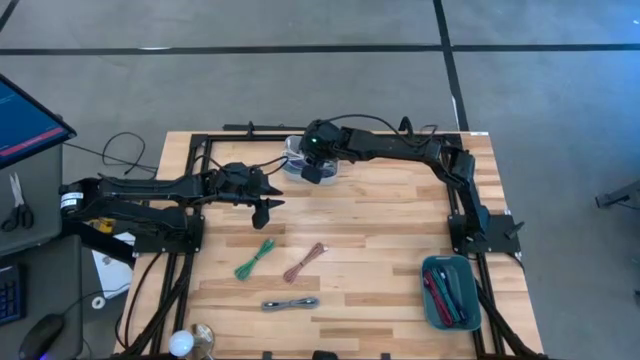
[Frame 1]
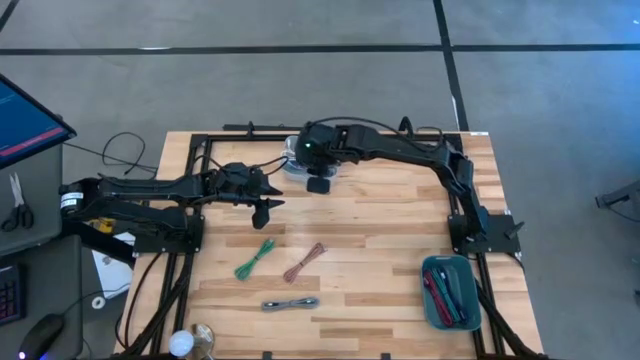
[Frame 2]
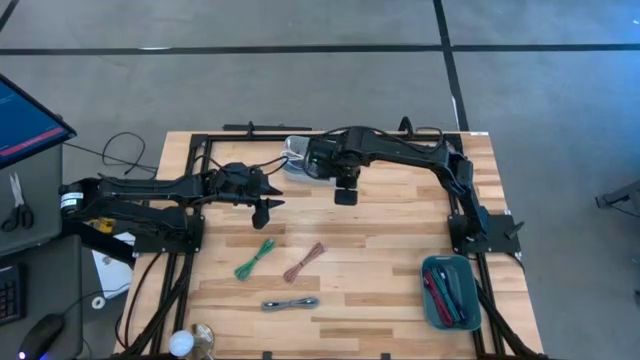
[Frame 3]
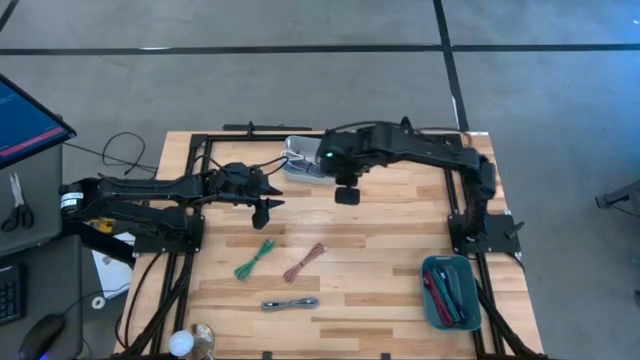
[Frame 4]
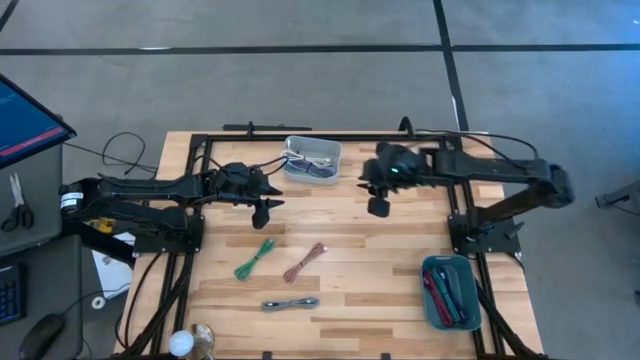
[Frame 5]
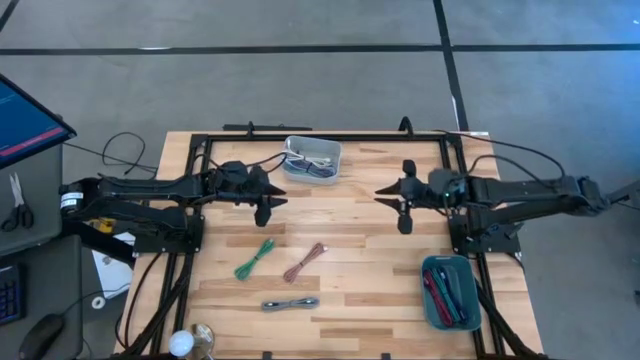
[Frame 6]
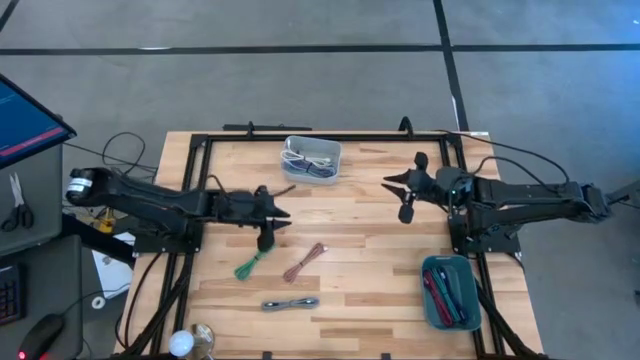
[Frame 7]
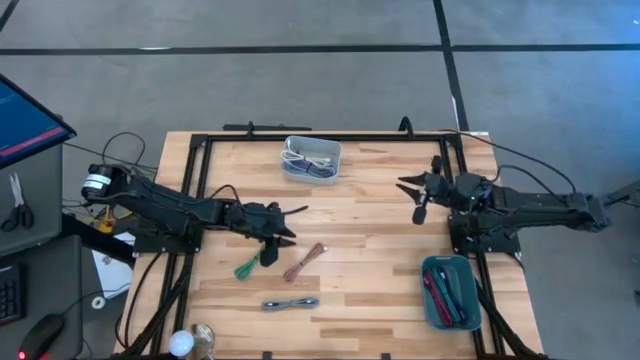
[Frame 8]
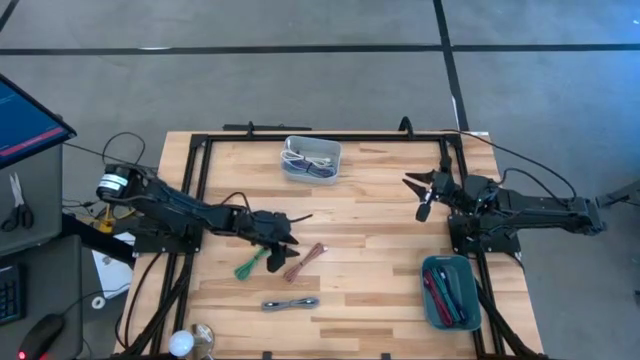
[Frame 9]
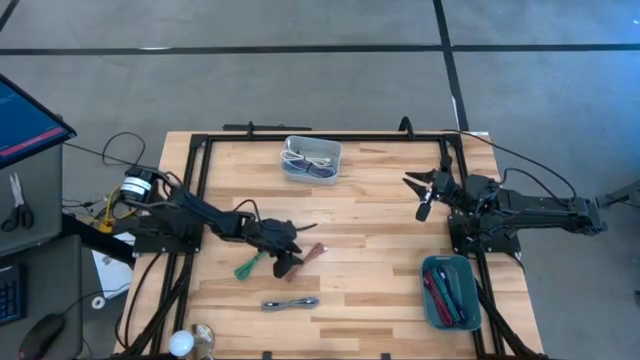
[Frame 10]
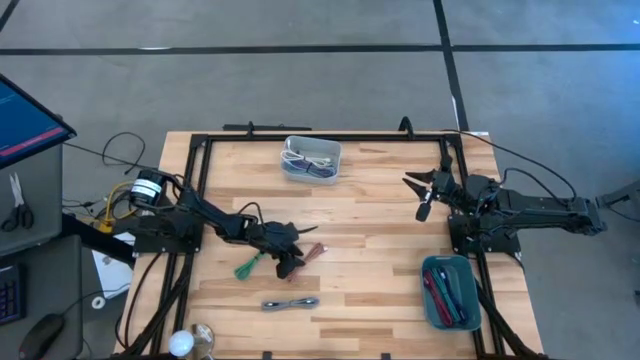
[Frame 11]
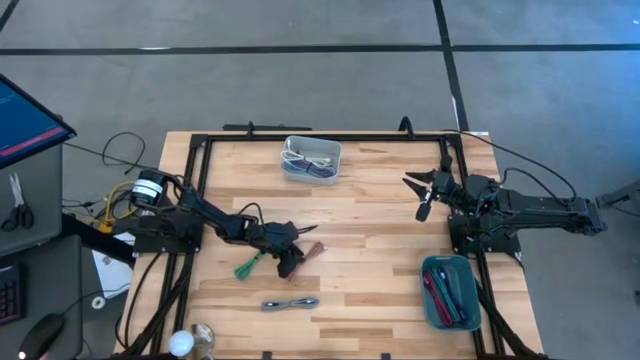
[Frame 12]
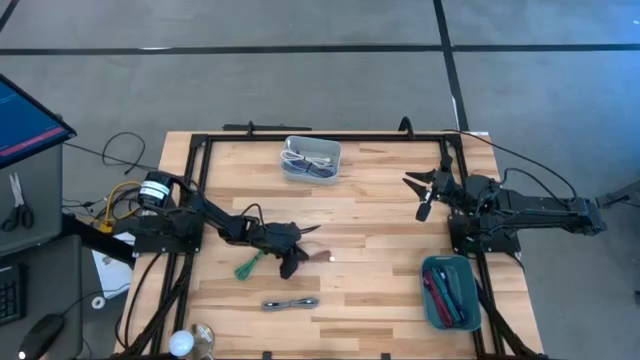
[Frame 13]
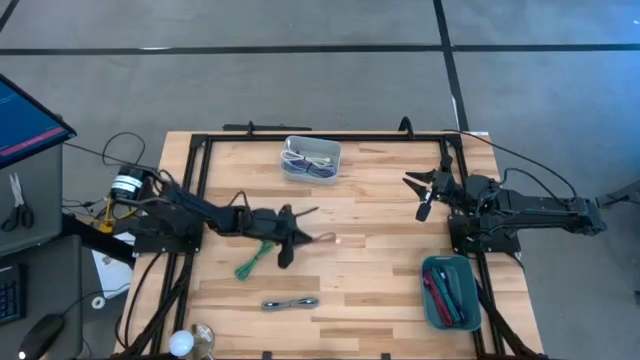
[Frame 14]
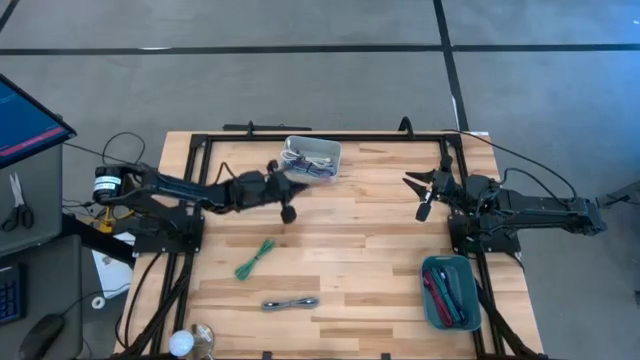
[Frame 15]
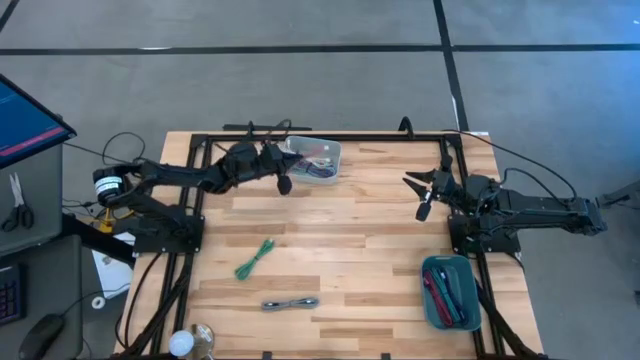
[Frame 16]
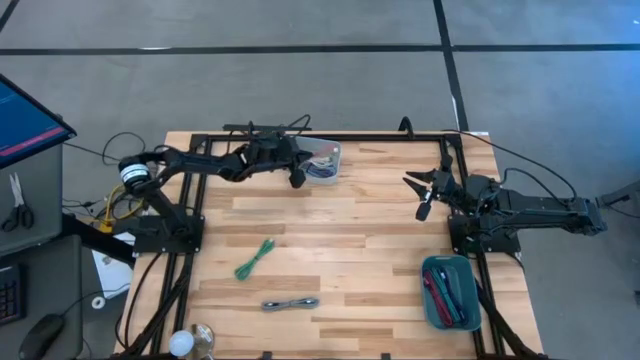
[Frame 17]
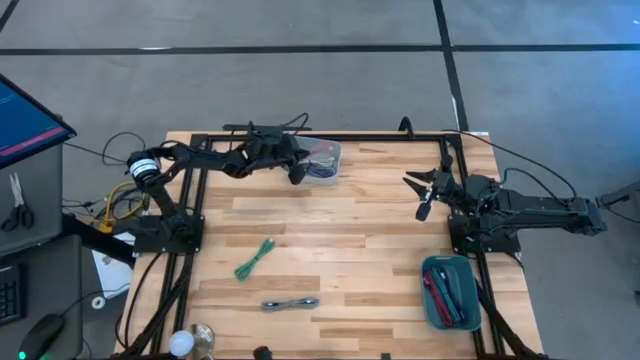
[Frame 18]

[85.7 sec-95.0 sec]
Task: Pick & Place USB Port
Put the pink charger cable into the gray bin

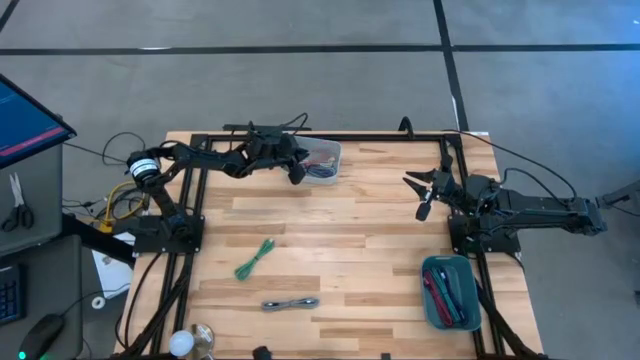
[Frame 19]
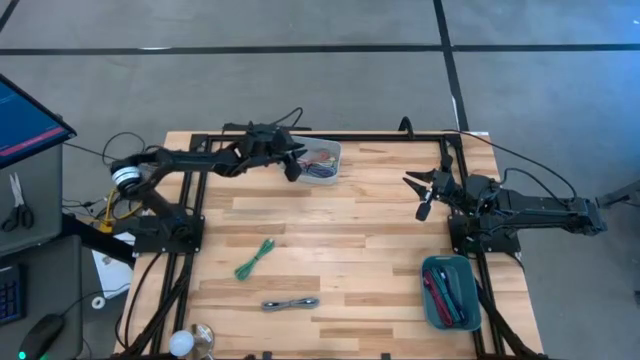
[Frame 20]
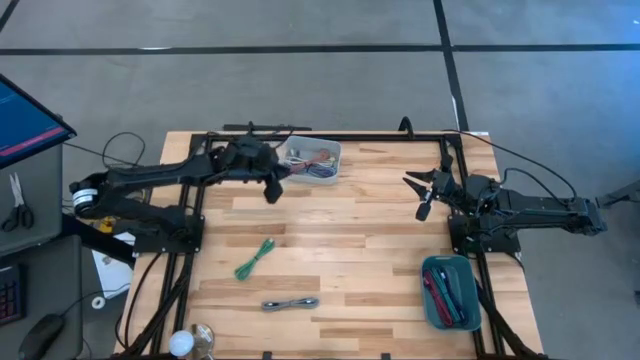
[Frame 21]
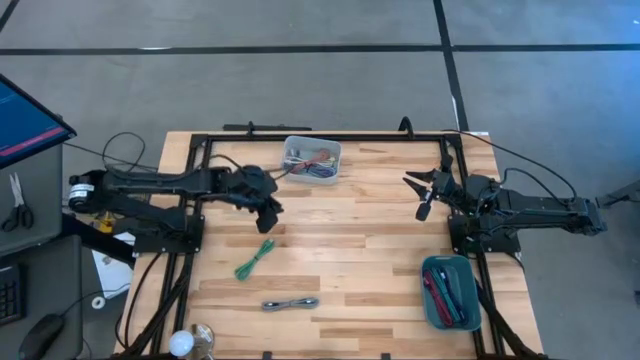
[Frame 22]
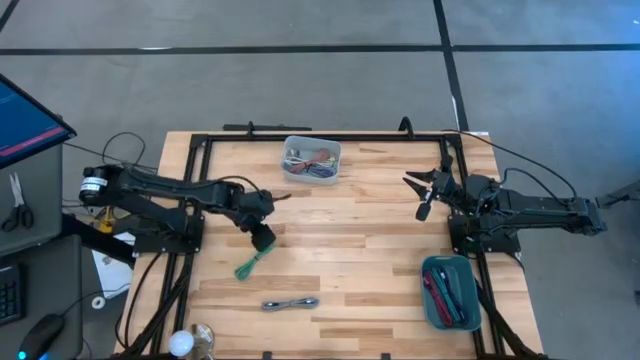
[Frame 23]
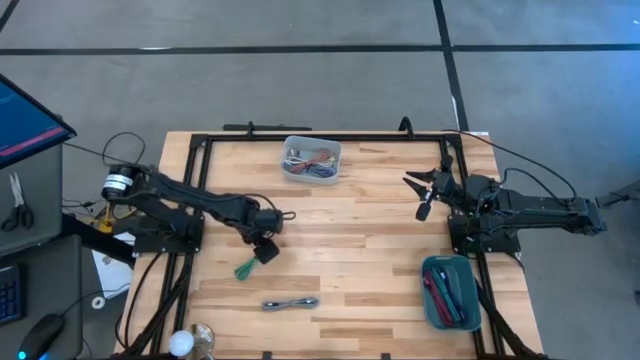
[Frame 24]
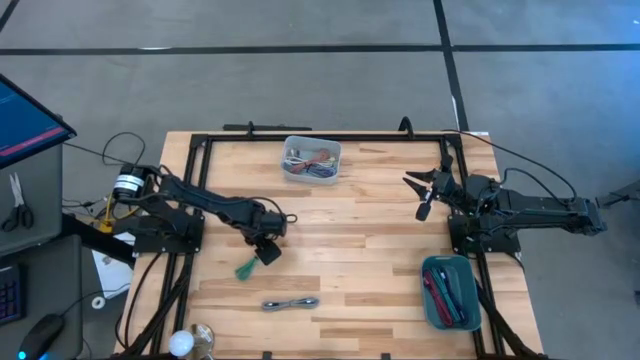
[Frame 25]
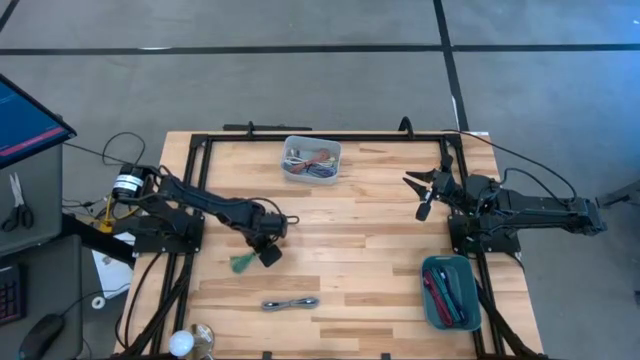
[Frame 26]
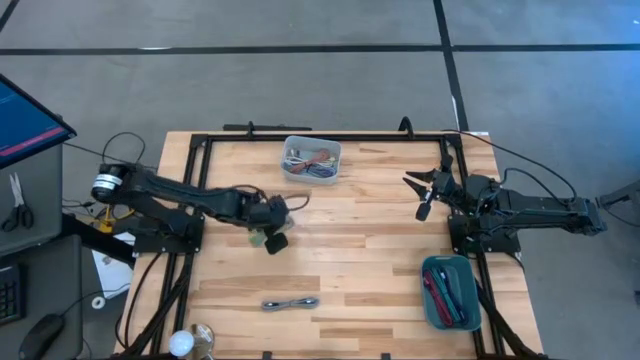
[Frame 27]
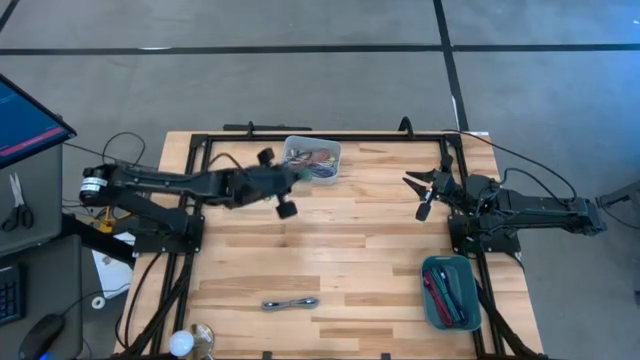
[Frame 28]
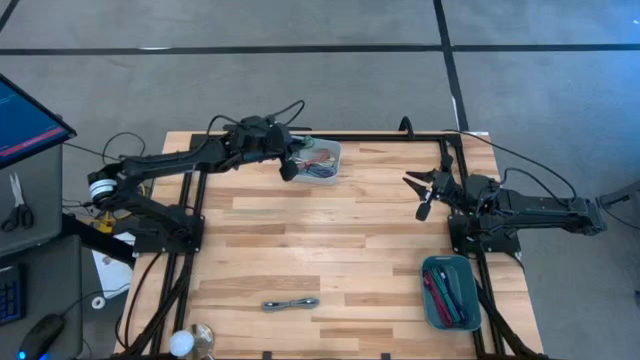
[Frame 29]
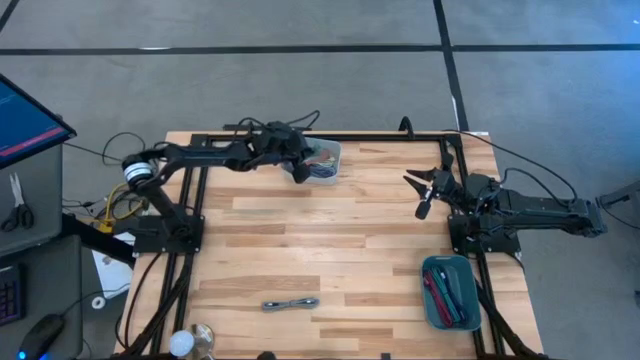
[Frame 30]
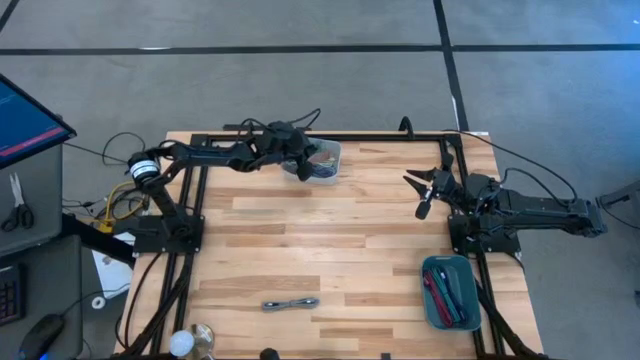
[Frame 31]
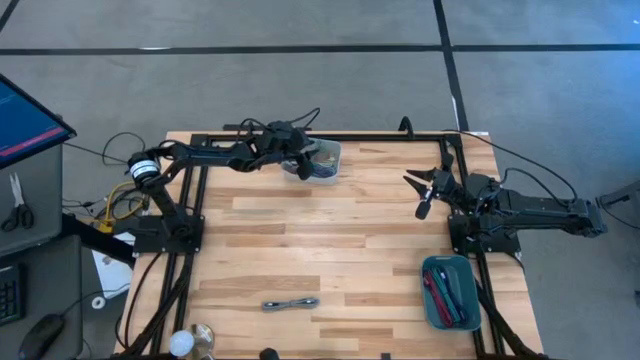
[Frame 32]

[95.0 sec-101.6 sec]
Put the green charger cable into the gray bin

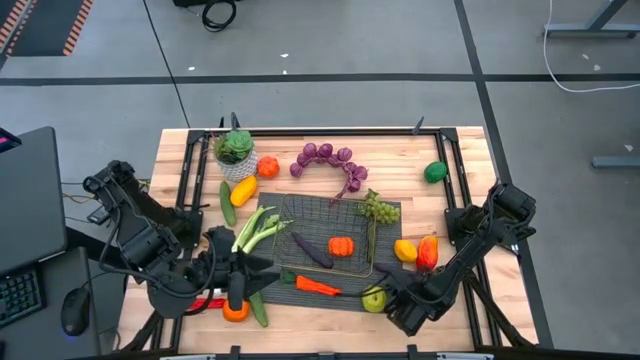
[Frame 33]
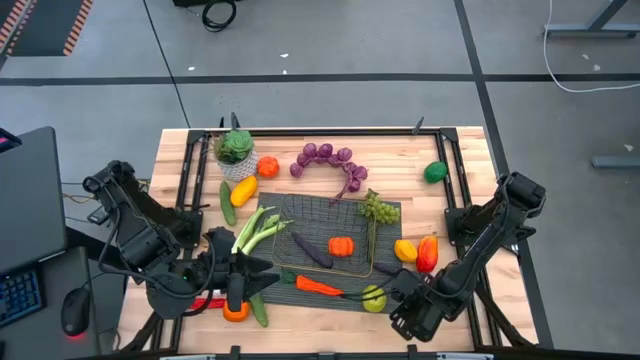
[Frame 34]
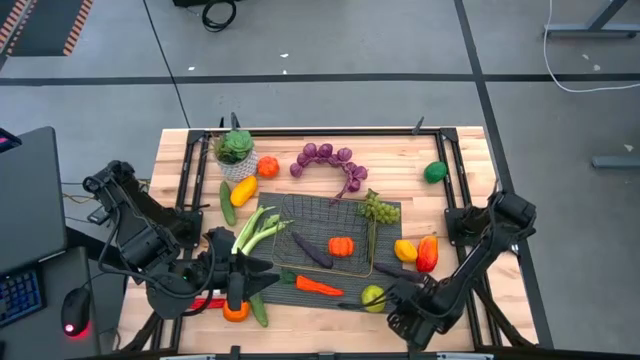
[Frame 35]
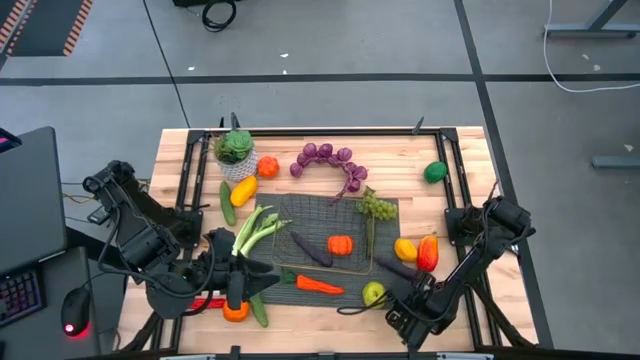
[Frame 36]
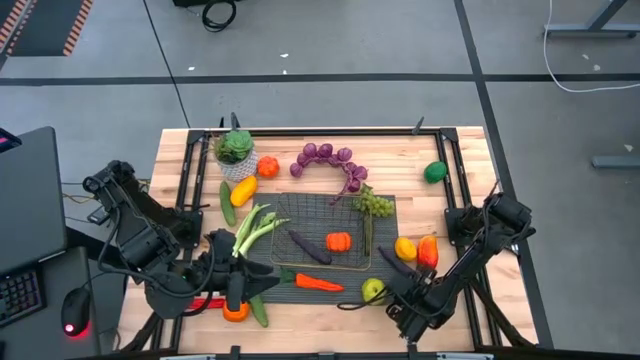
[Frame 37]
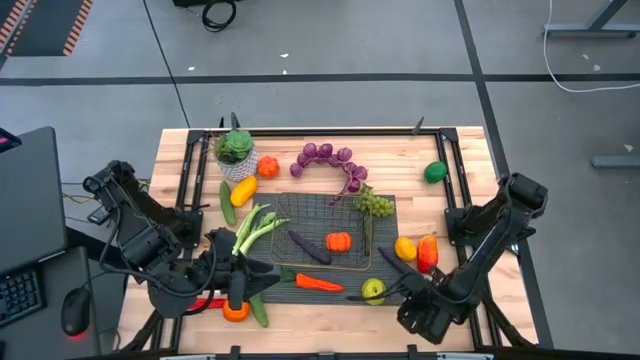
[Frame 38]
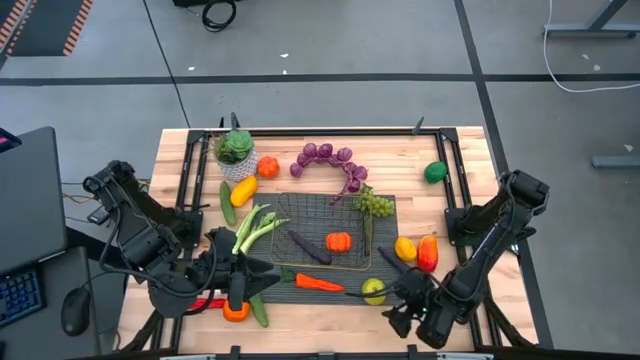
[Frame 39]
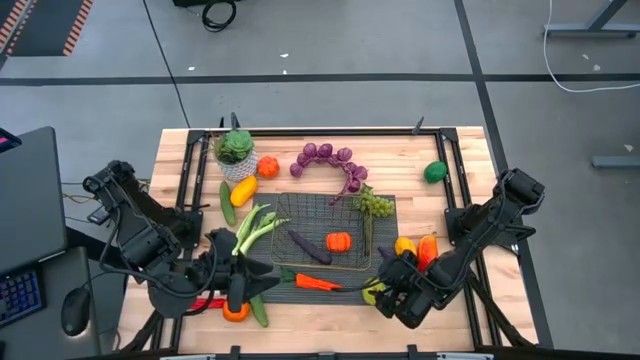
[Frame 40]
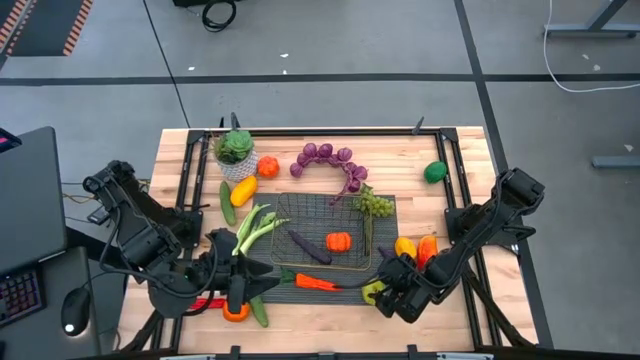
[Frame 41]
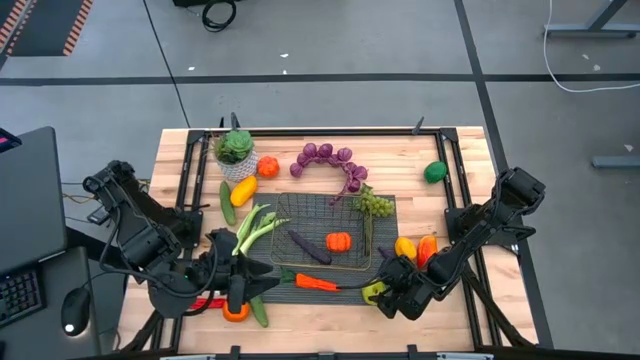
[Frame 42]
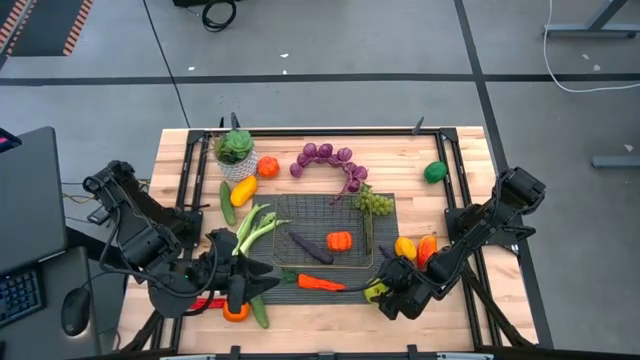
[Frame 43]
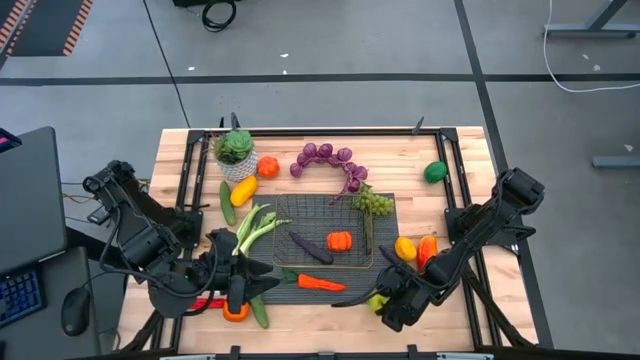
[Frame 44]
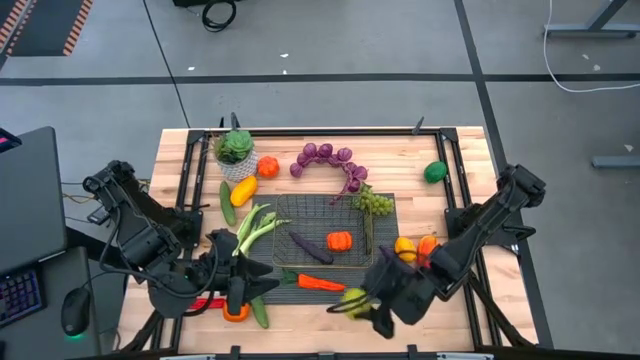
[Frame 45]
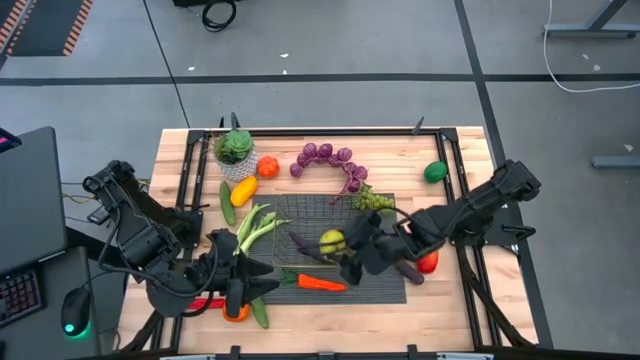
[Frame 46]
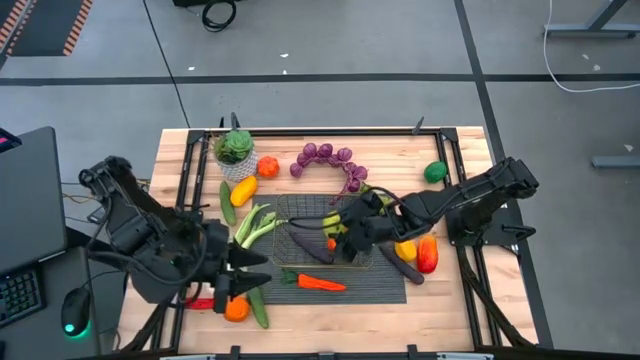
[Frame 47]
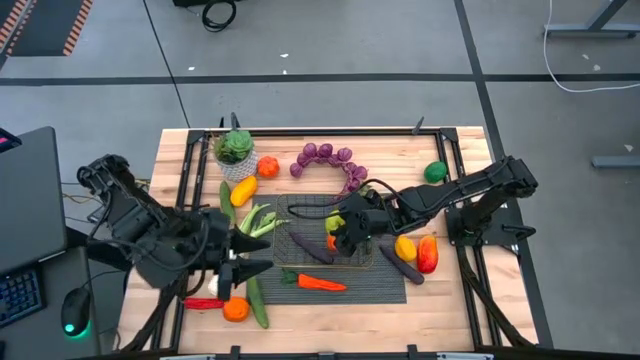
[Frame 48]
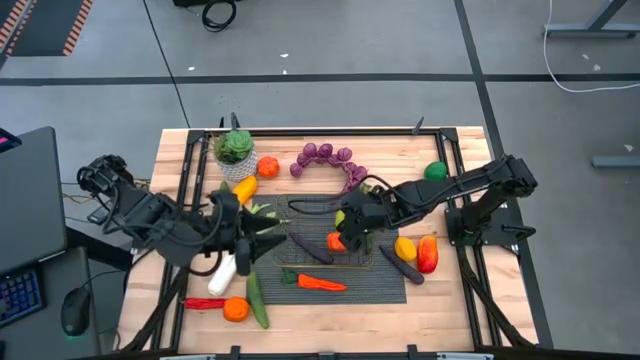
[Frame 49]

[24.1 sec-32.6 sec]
Task: Build produce basket
Put the green apple into the gold wire basket
